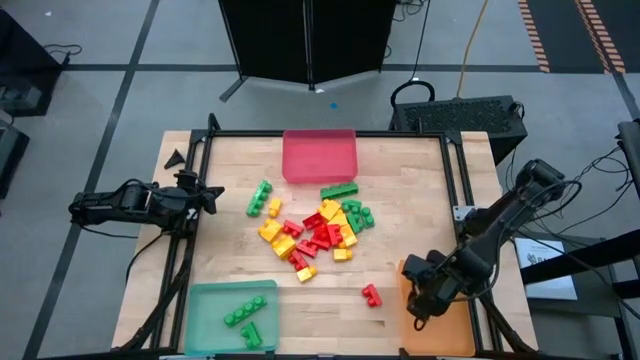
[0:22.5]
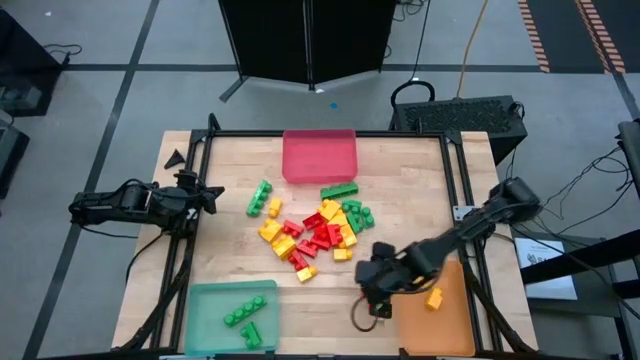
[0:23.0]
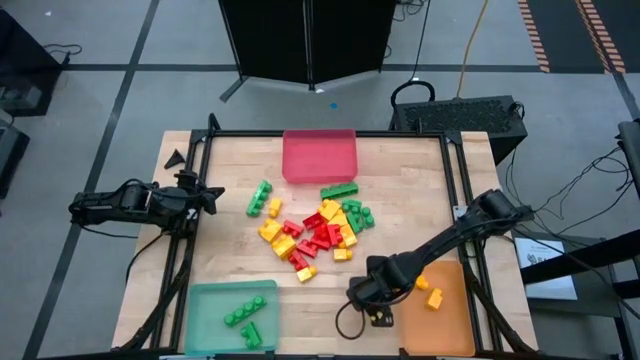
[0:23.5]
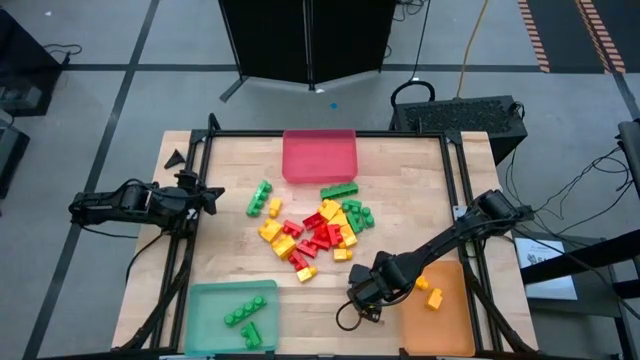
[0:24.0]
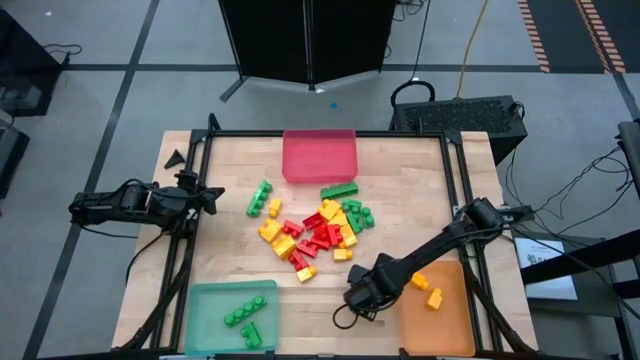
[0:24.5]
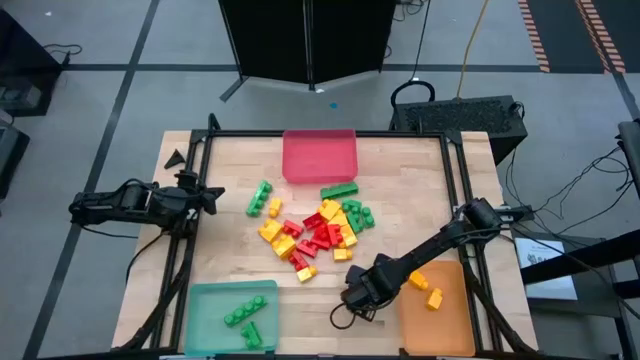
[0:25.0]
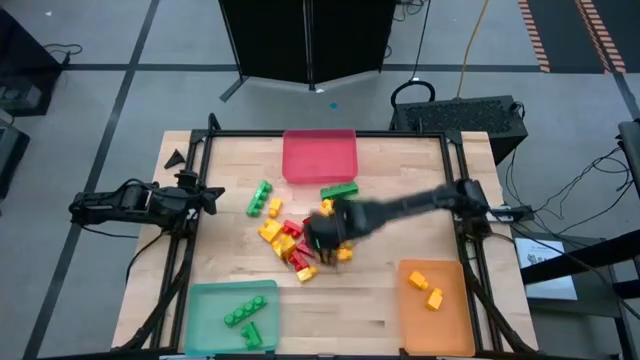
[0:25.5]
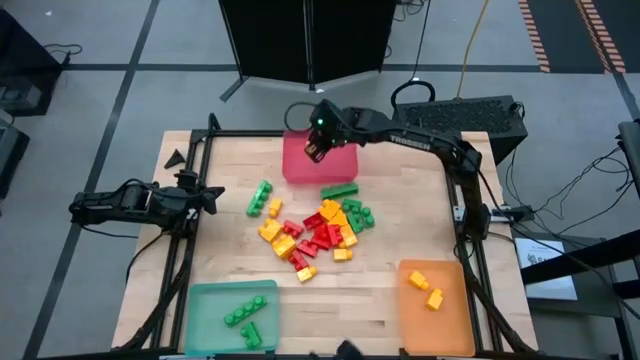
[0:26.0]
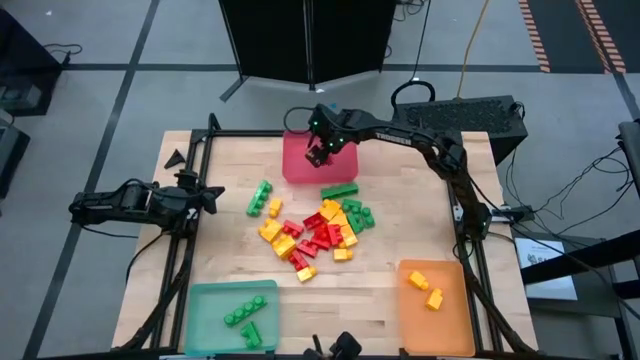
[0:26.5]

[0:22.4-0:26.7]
Task: Sort blocks
Put the red game piece into the red bin

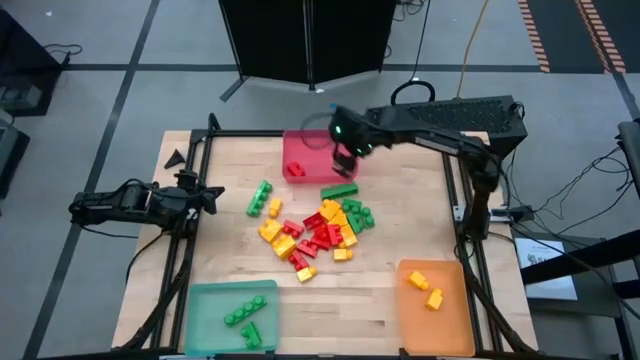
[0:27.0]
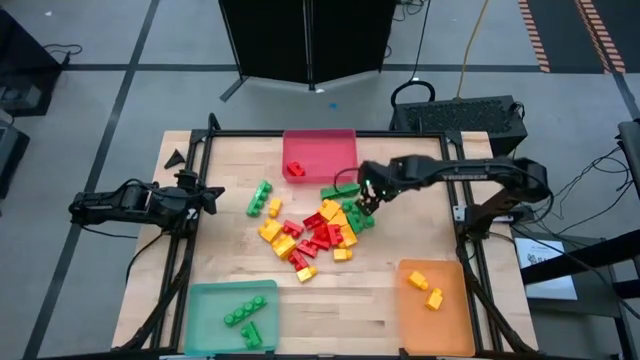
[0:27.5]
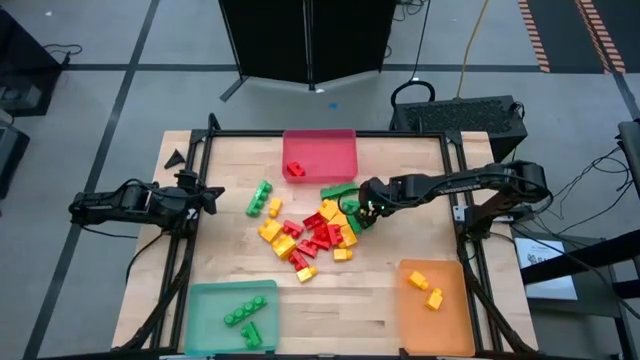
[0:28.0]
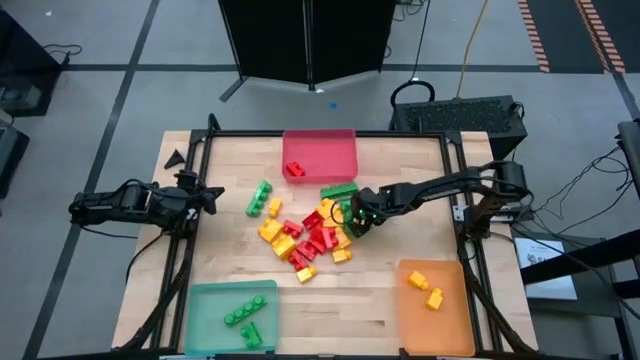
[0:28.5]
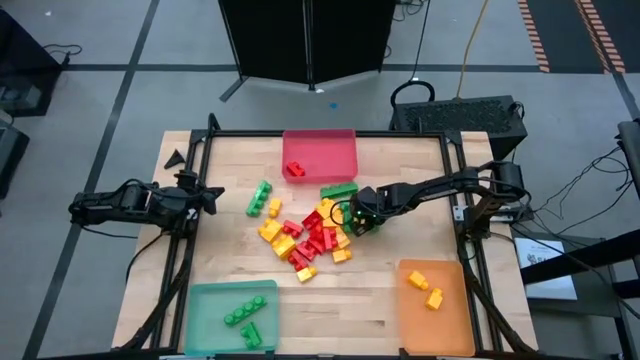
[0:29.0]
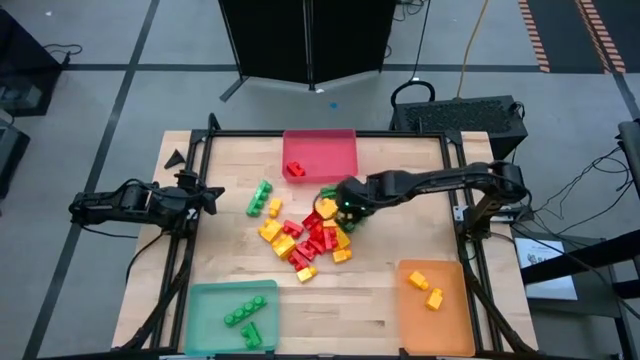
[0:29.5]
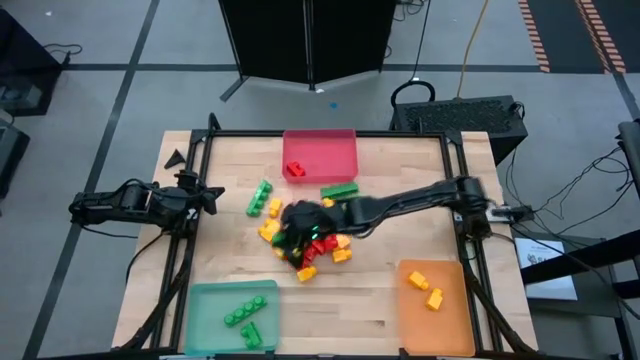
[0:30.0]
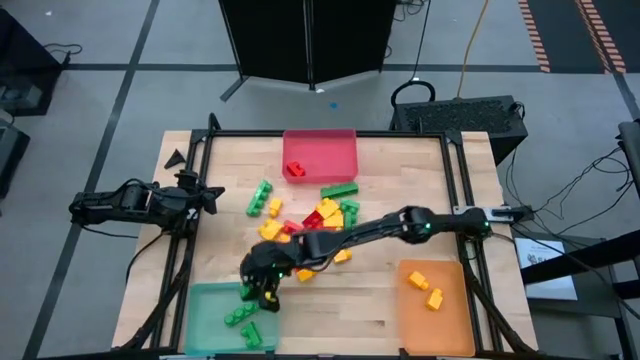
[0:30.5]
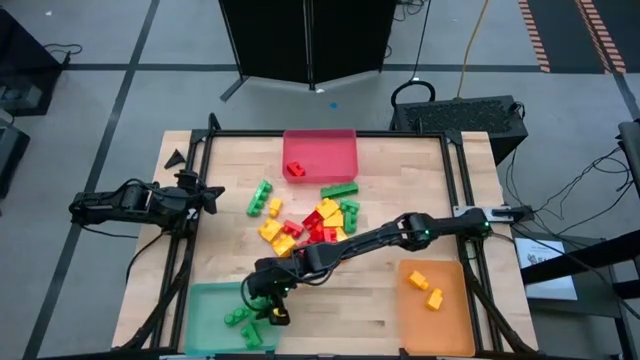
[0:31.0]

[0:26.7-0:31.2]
Put the green game piece into the green bin

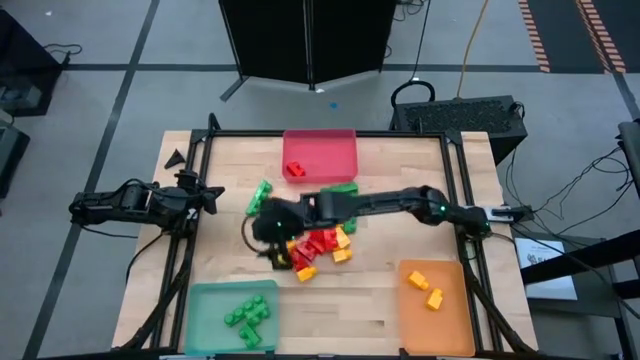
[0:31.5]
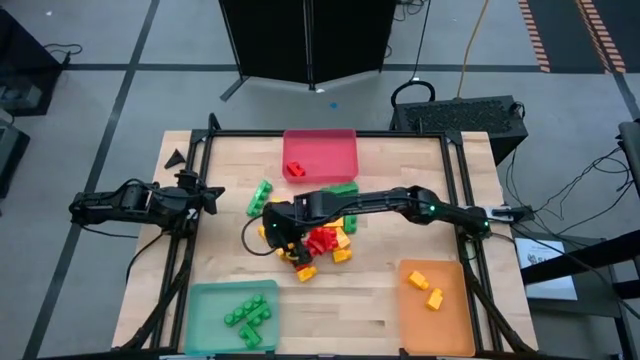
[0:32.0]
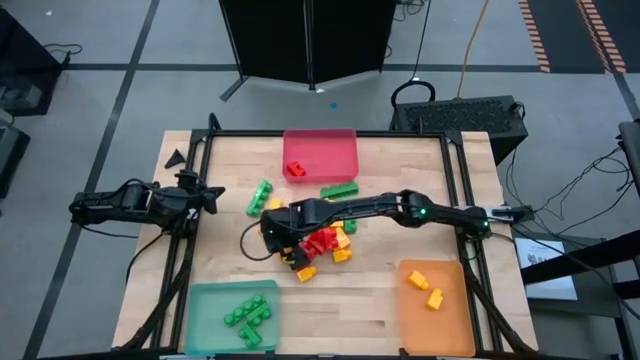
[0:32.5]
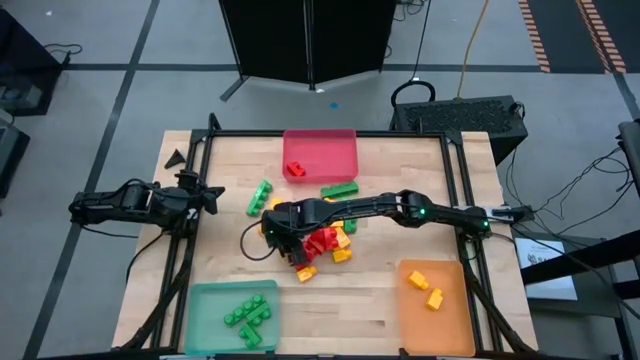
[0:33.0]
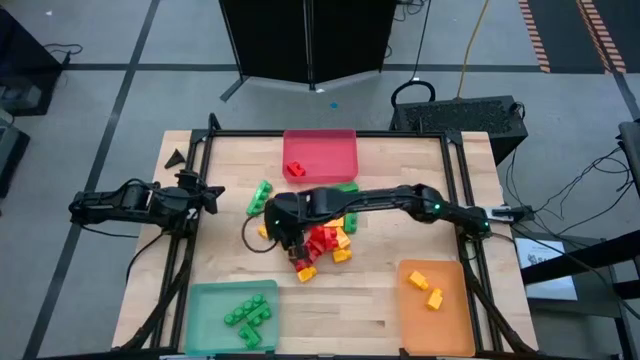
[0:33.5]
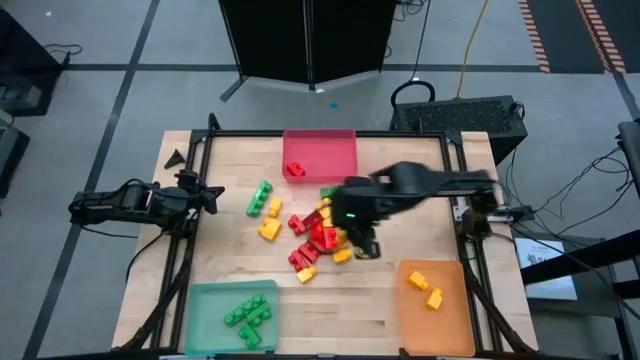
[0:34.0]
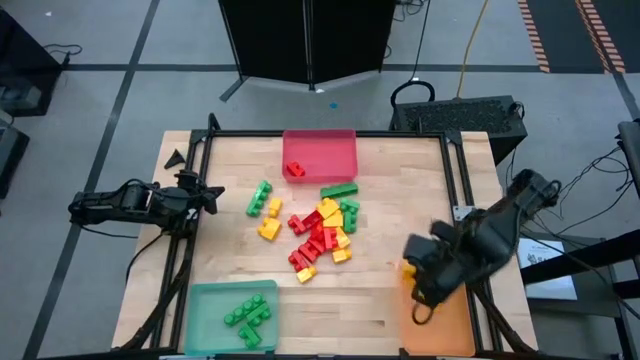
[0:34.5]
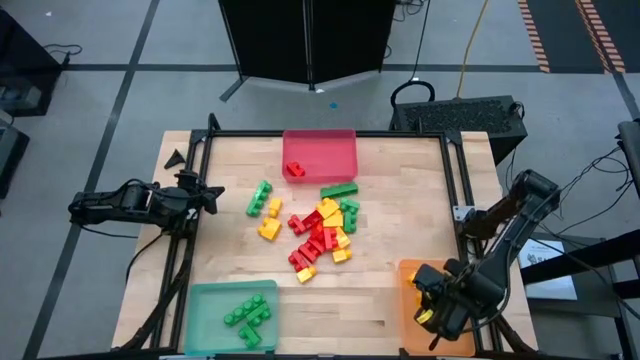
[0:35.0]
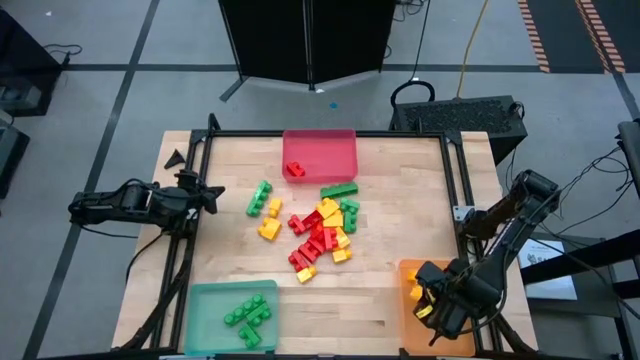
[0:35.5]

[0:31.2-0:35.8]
Put the yellow game piece into the orange bin

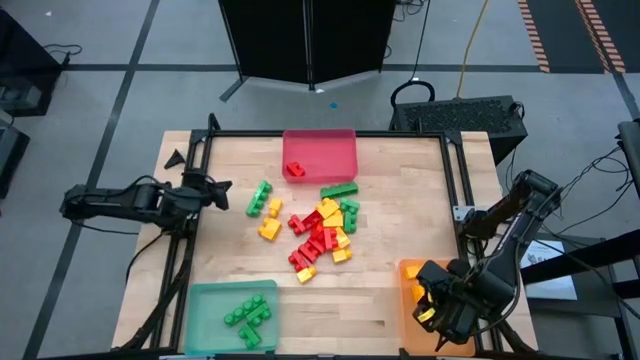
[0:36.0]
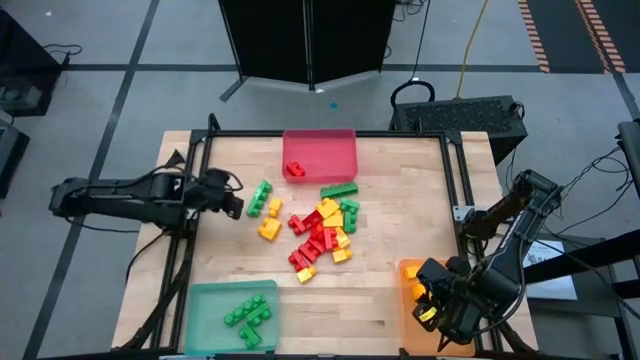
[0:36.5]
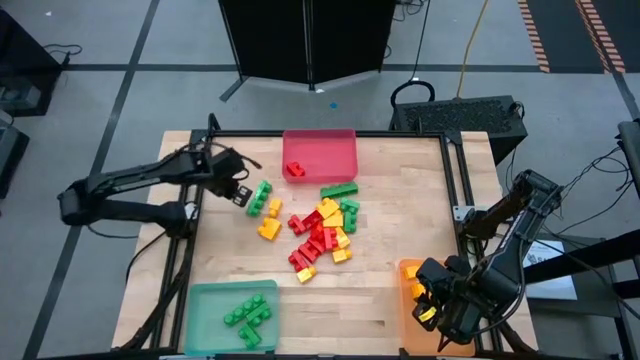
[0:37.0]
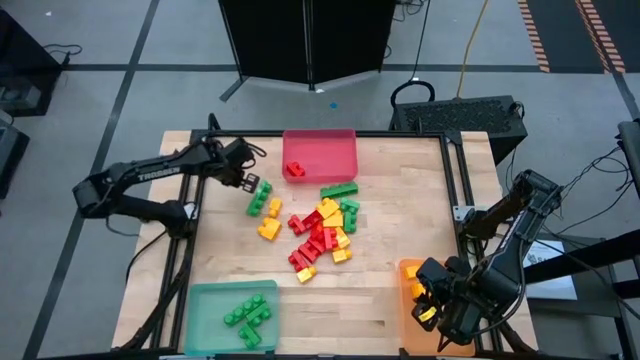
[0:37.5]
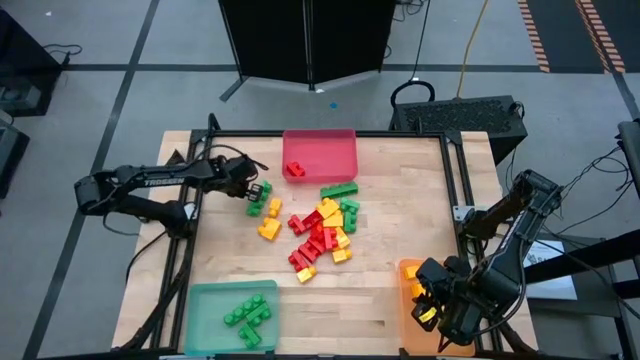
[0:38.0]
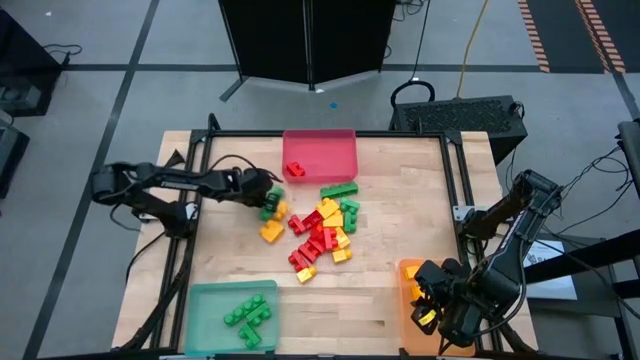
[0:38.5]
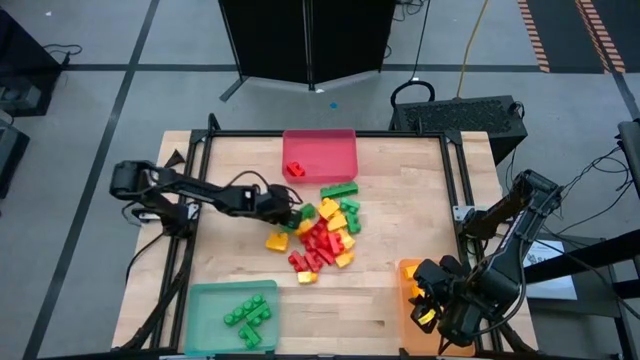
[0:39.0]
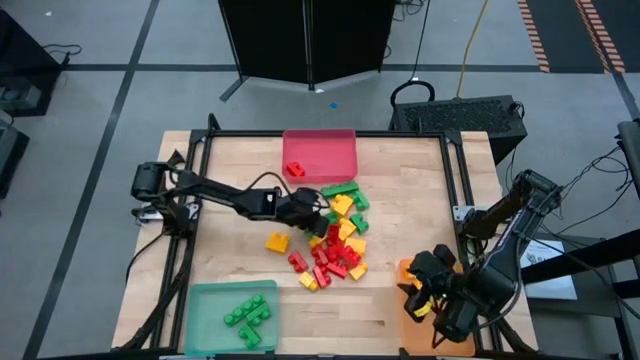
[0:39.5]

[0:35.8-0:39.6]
Adjust the game pieces to the center of the table

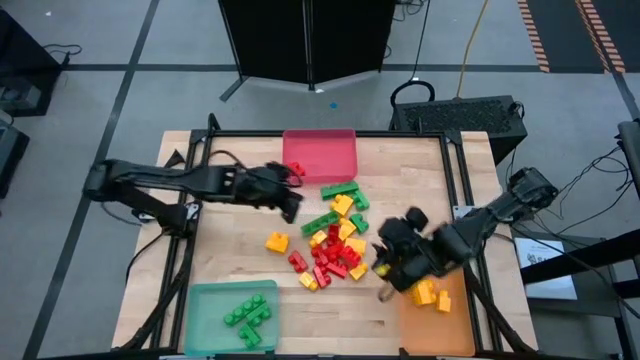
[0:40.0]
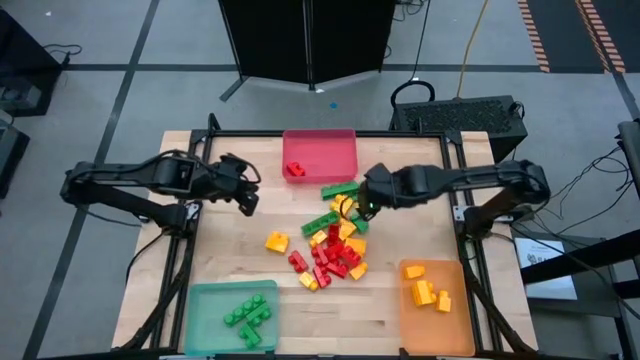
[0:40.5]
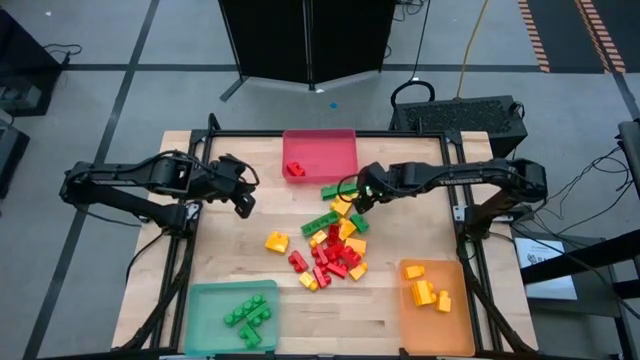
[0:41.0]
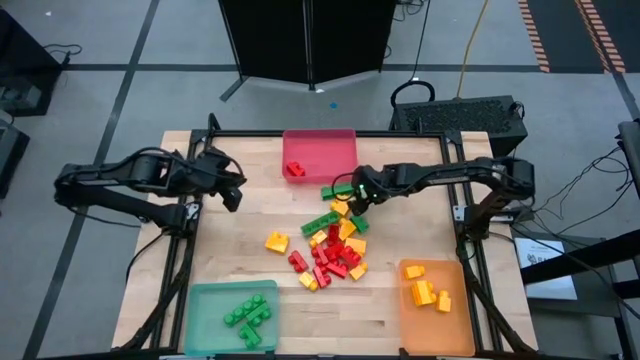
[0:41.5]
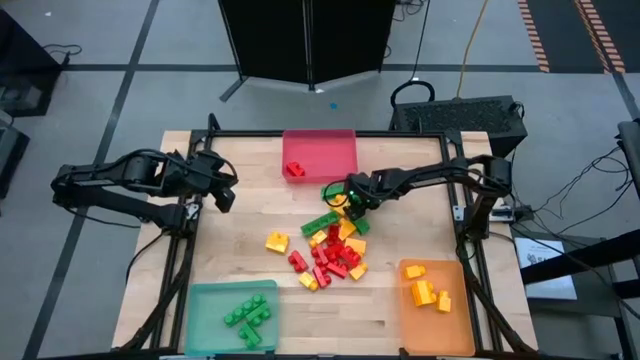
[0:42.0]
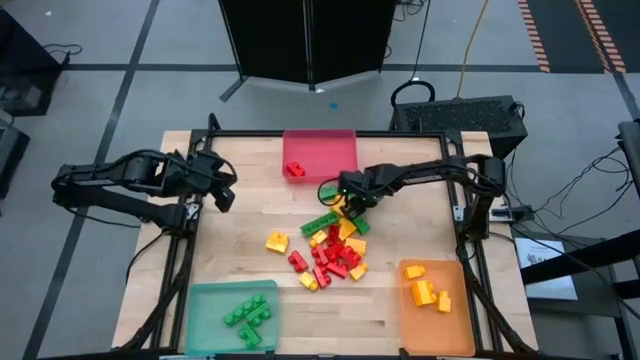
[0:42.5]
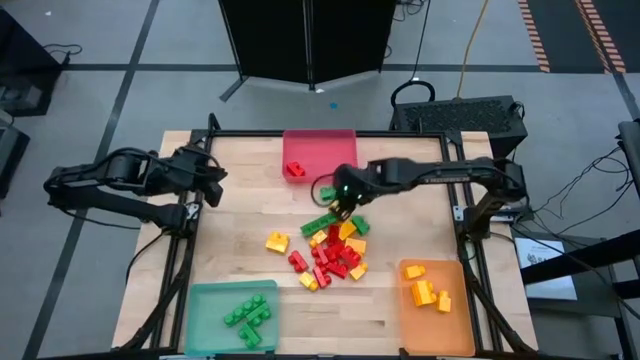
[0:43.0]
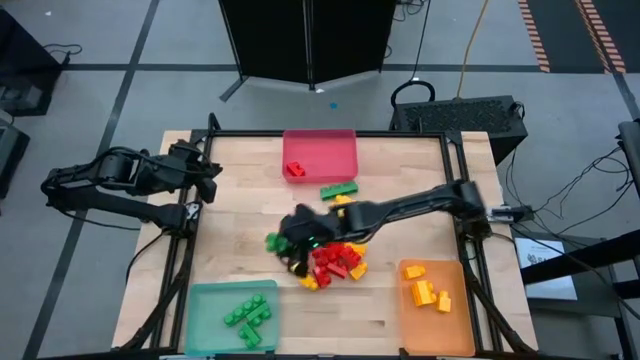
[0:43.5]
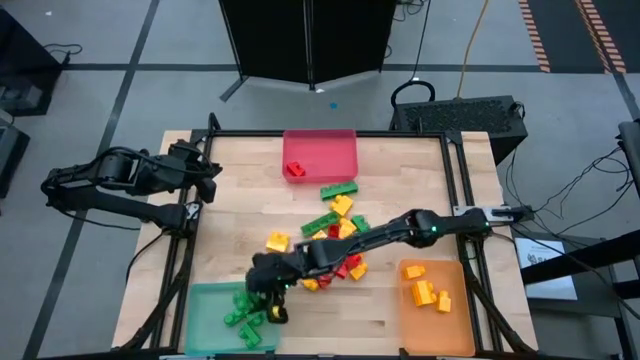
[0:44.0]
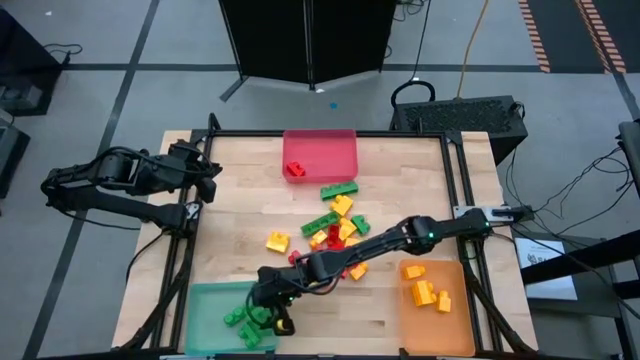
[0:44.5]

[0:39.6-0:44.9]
Put the green game piece into the green bin
